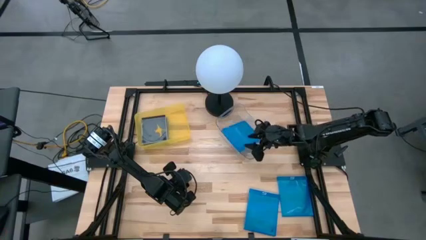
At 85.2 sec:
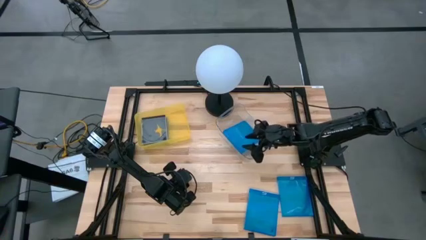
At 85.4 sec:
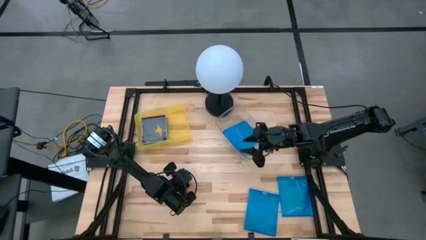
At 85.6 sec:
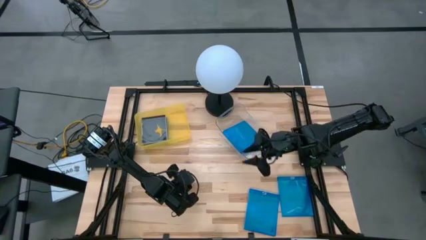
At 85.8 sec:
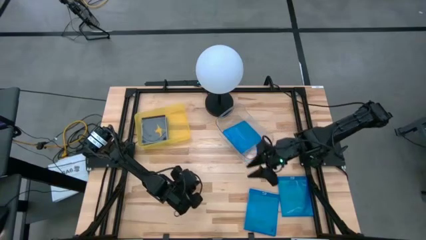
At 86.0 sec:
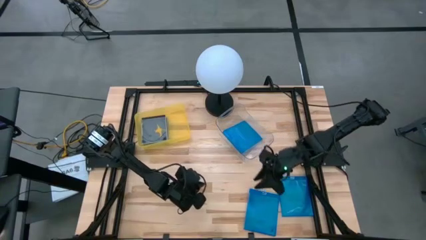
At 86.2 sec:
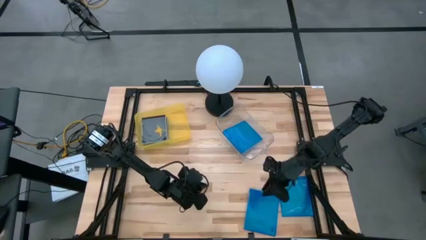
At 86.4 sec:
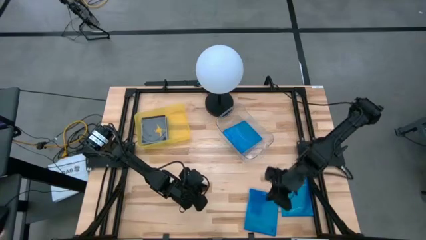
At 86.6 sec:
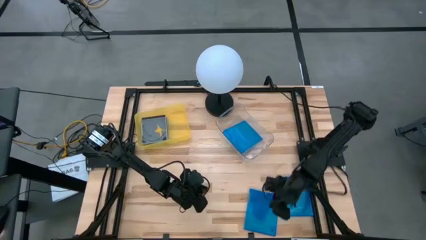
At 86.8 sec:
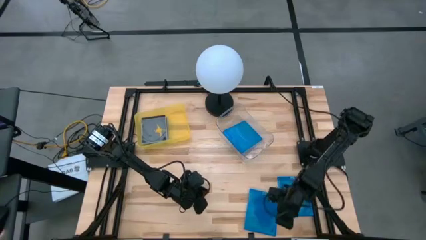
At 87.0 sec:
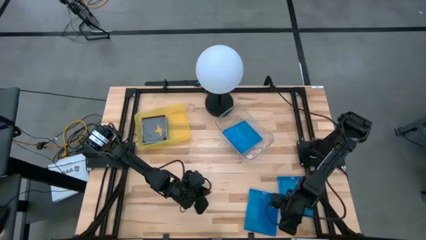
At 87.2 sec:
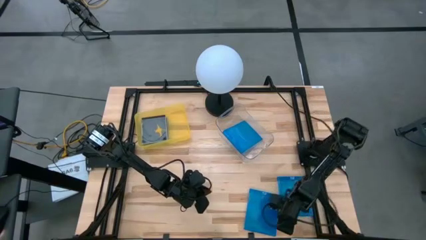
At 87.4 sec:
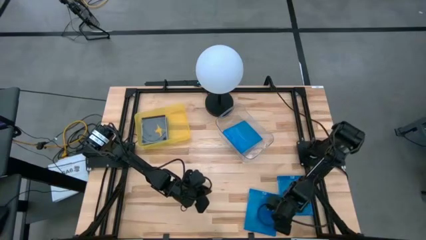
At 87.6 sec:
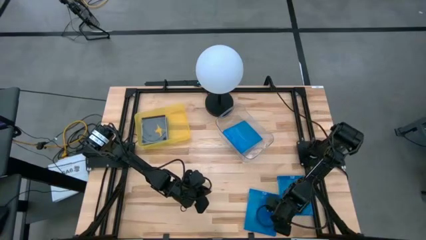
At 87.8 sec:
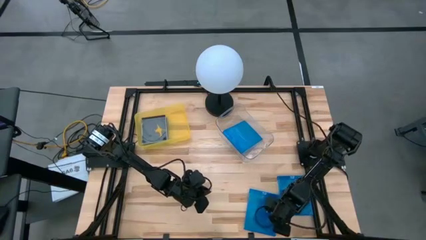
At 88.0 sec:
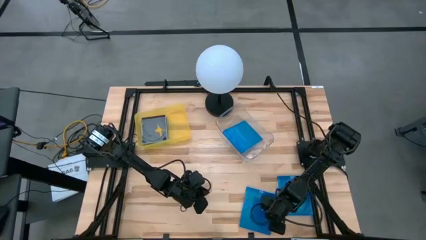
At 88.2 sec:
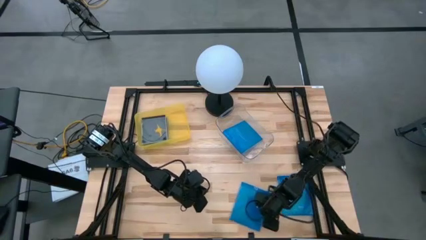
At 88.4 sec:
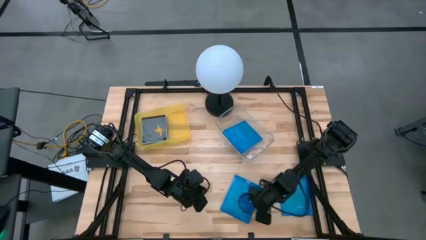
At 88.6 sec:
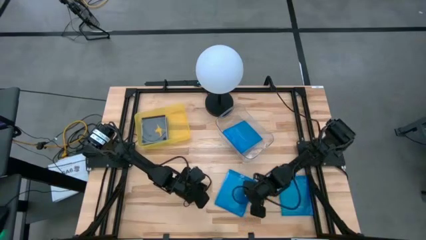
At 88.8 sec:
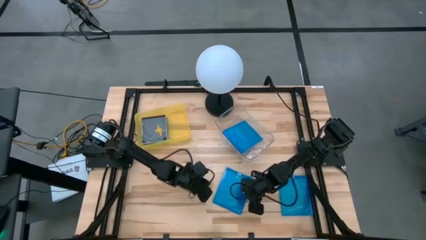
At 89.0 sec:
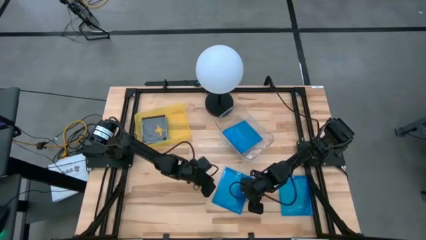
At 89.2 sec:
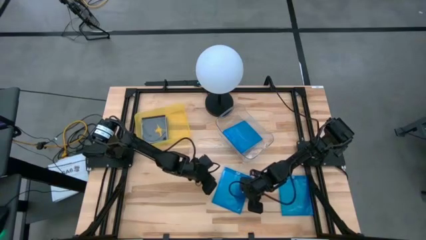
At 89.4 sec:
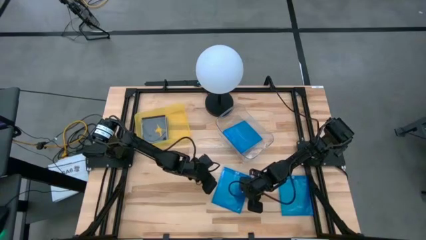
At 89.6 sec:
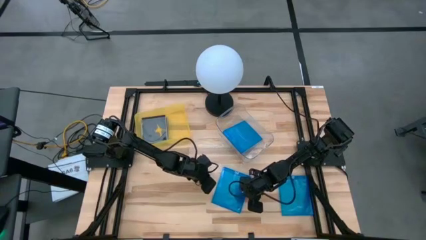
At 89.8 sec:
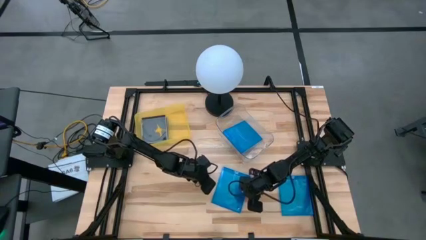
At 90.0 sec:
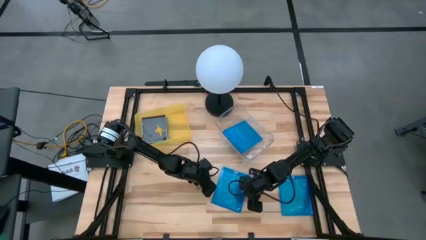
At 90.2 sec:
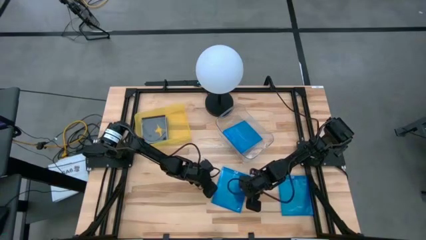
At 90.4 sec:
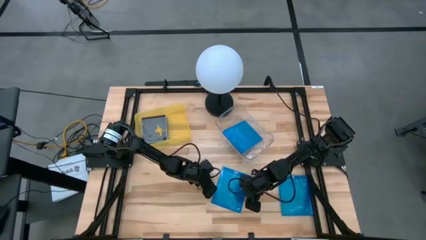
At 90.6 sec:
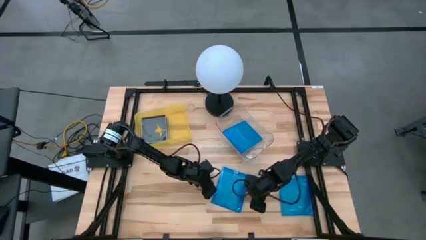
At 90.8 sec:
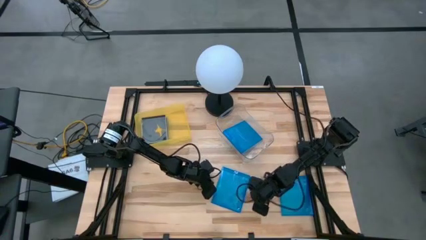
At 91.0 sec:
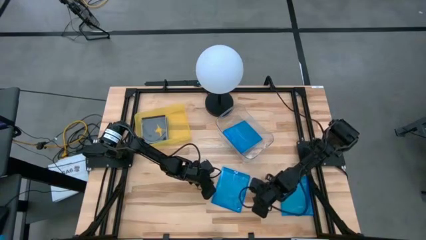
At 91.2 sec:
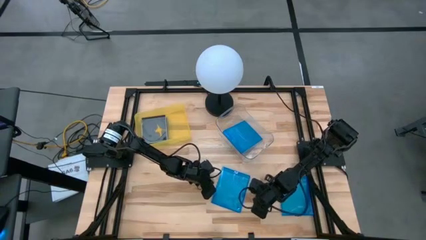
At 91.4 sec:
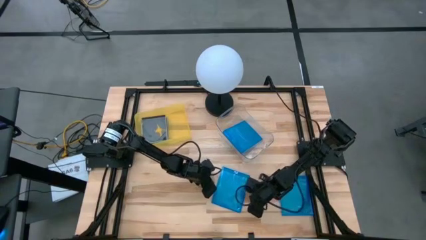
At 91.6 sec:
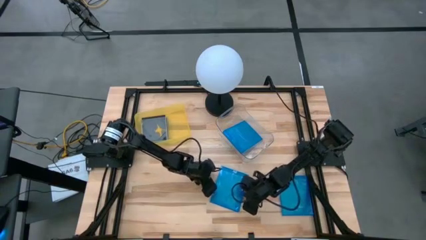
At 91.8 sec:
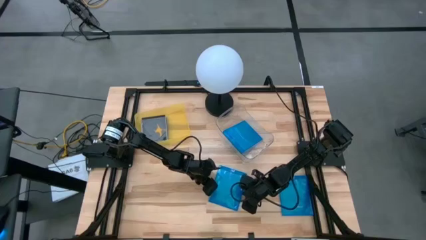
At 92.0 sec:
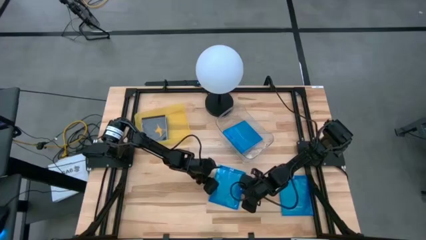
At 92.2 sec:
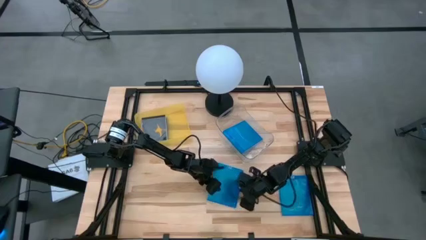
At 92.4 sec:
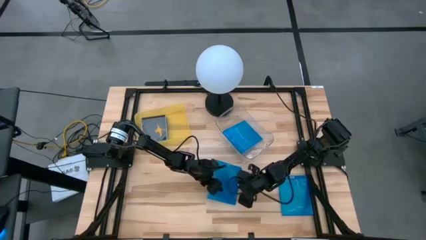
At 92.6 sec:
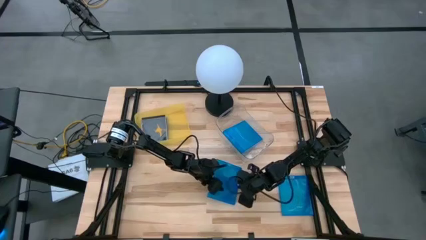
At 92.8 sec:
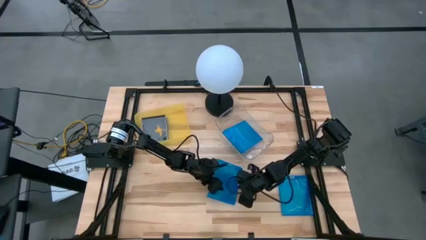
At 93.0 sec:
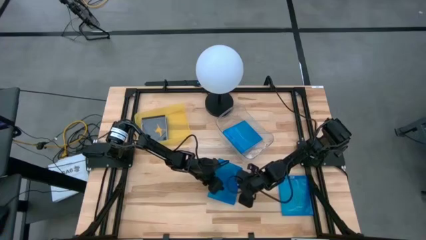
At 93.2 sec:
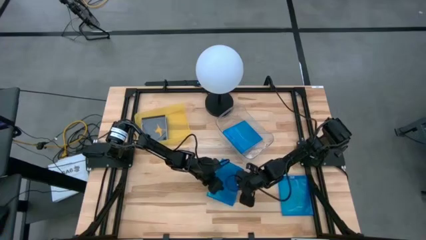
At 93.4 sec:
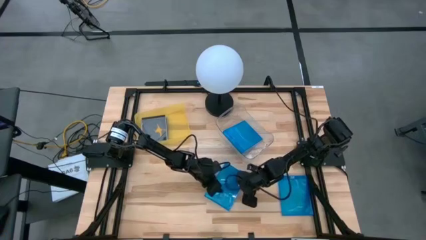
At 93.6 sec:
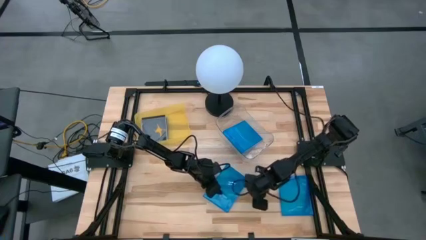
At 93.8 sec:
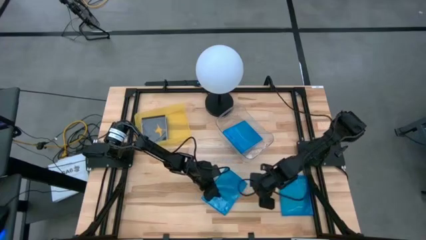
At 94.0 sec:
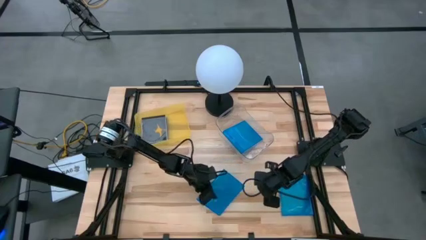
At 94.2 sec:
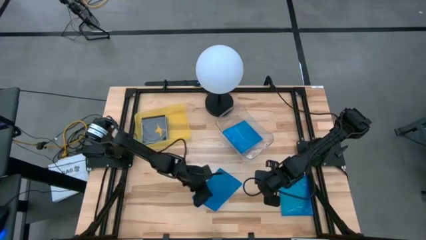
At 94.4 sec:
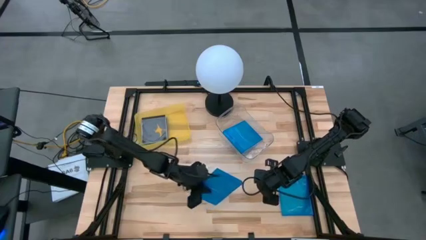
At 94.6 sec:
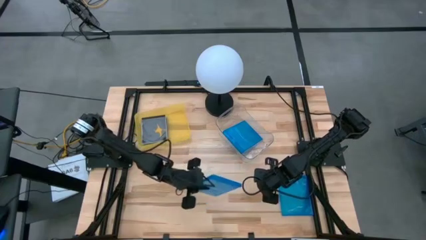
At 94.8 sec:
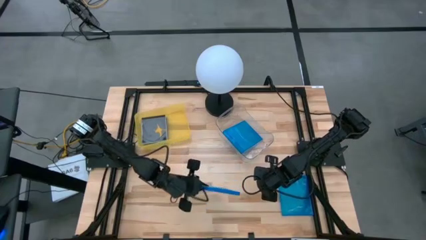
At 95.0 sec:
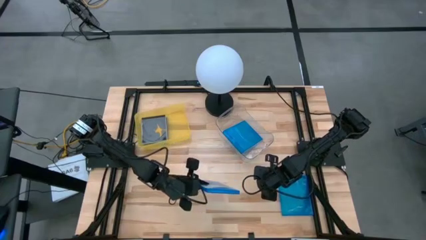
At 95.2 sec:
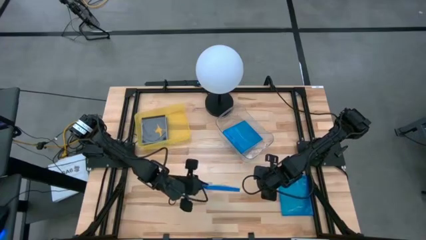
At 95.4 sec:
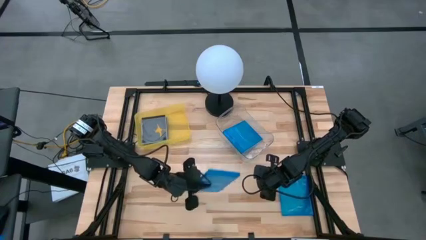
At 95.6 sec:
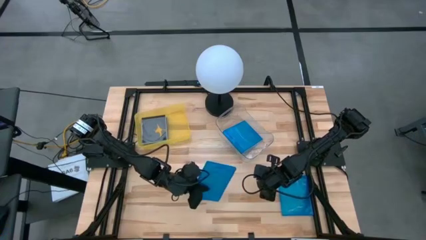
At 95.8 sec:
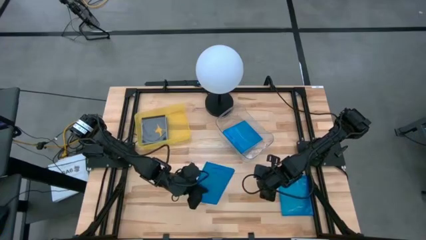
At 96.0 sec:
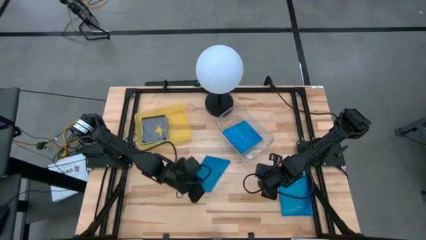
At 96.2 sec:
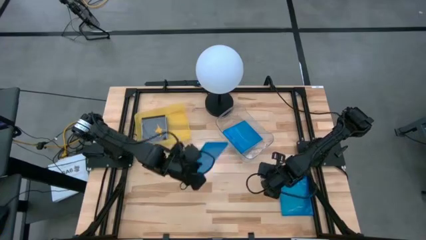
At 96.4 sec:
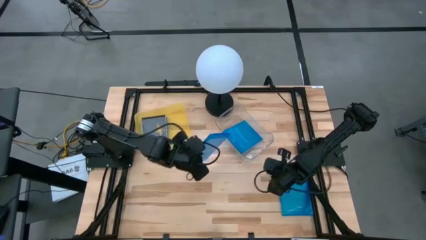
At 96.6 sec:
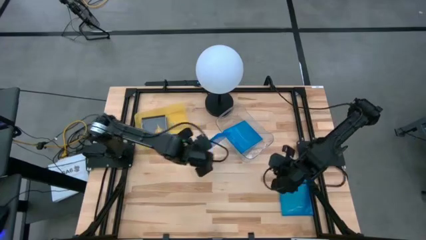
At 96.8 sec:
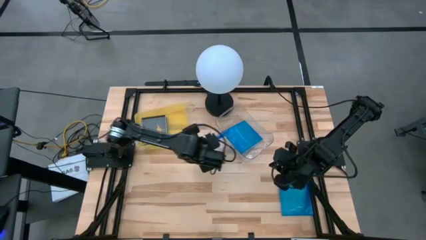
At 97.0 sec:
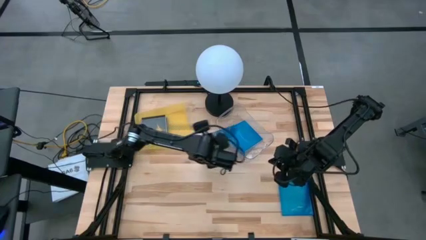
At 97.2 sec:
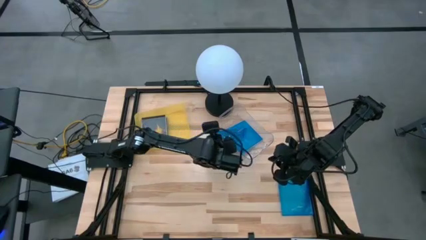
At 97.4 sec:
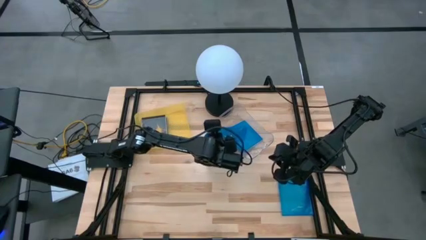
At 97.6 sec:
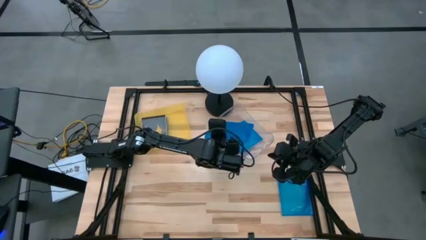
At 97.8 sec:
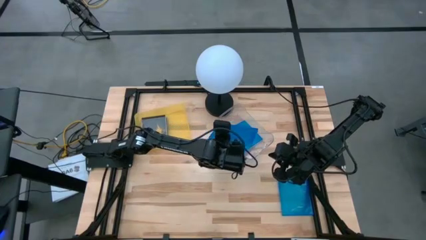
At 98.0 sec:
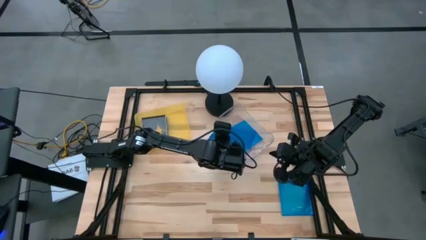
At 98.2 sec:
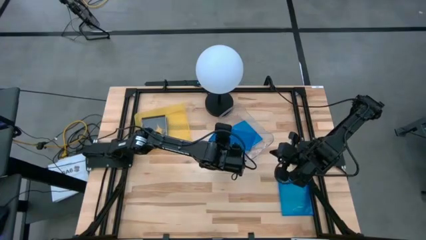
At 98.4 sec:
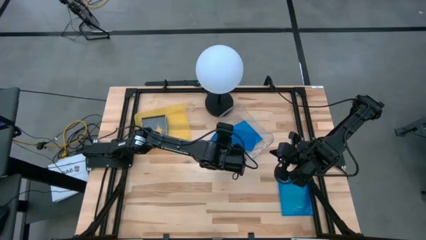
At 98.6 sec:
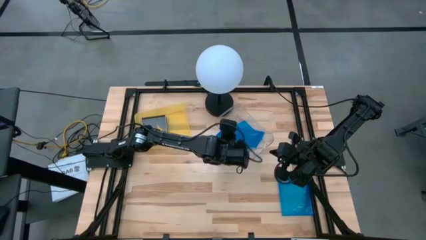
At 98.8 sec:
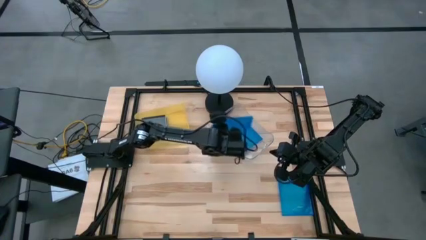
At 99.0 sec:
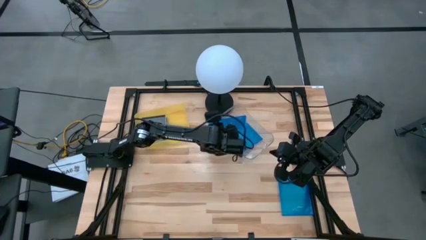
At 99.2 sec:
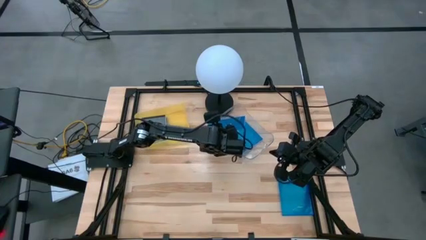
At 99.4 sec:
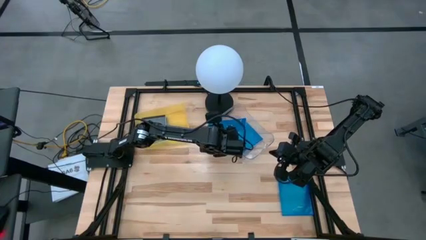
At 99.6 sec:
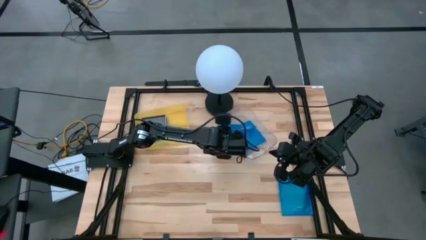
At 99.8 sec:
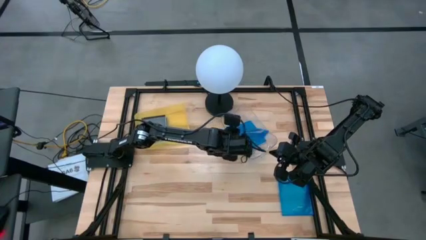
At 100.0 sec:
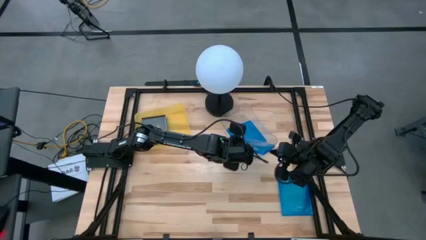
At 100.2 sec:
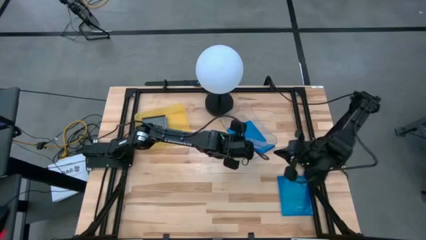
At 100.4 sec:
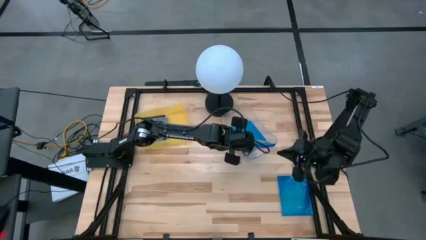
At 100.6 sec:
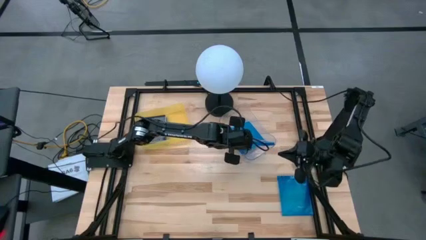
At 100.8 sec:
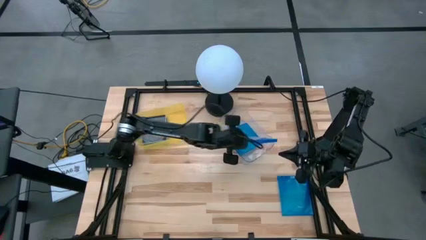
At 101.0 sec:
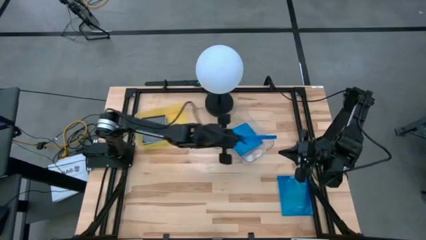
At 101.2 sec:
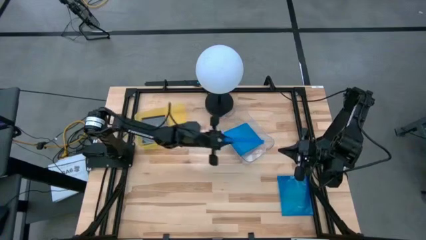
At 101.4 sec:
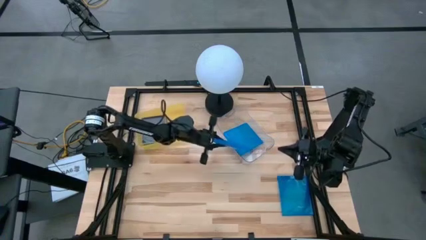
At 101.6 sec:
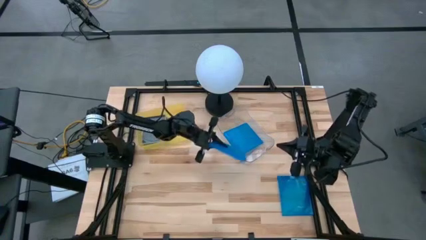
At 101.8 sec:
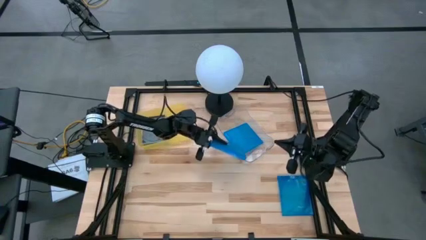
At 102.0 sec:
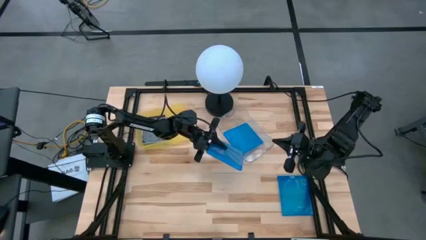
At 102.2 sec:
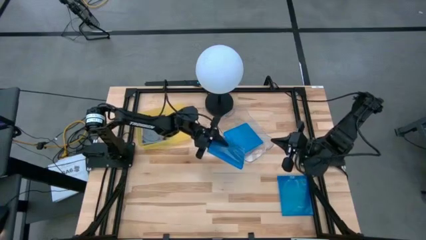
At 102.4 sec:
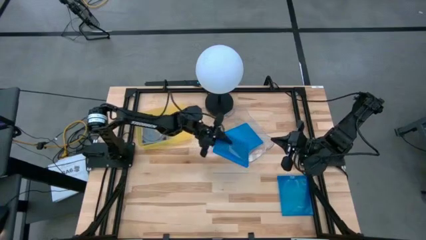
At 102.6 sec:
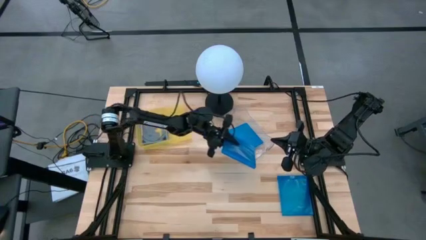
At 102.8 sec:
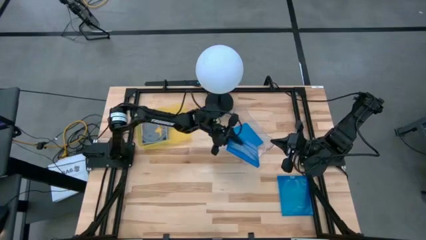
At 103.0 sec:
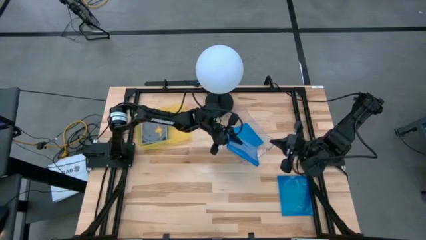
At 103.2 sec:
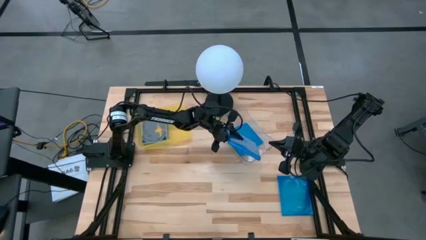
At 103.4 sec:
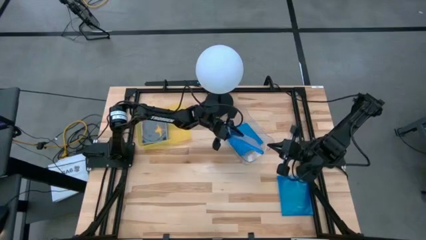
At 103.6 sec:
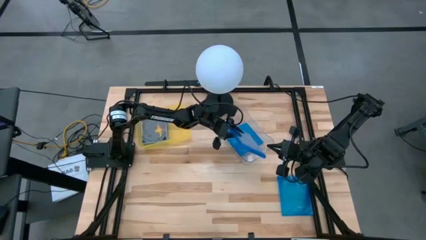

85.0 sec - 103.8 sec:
Task: Pick & place jewel cases by type
Put the left blue CD case into the transparent bin
